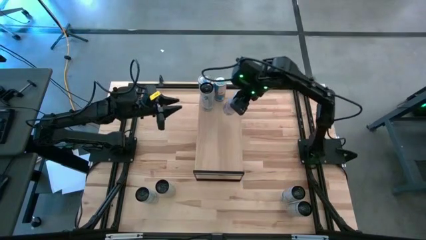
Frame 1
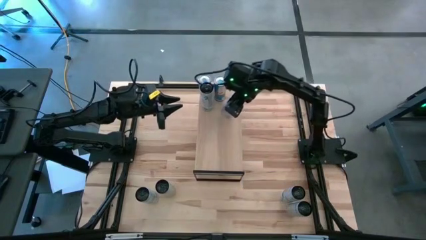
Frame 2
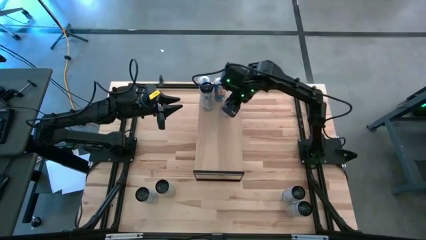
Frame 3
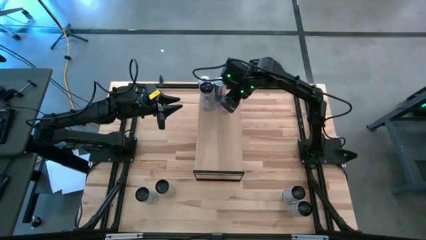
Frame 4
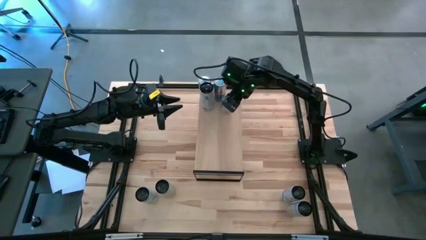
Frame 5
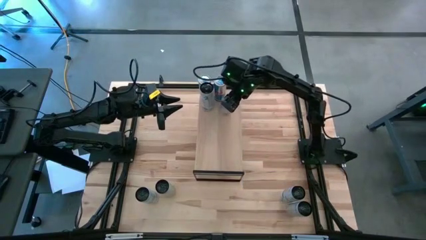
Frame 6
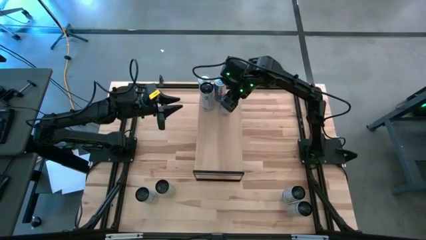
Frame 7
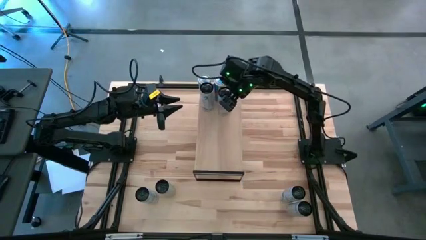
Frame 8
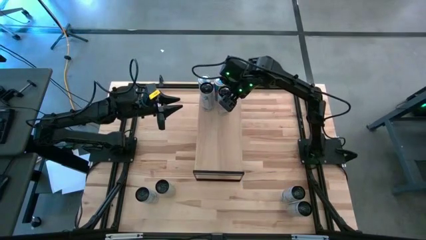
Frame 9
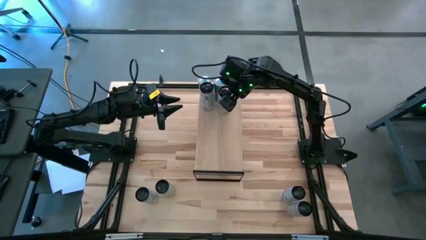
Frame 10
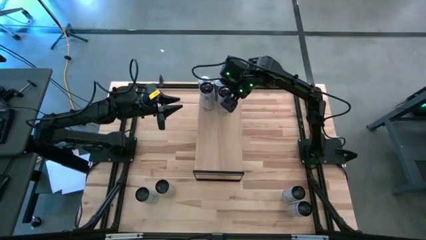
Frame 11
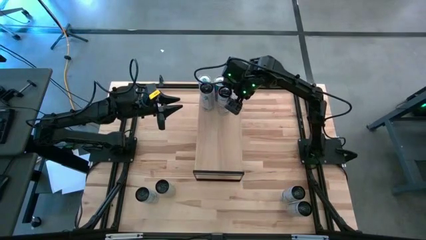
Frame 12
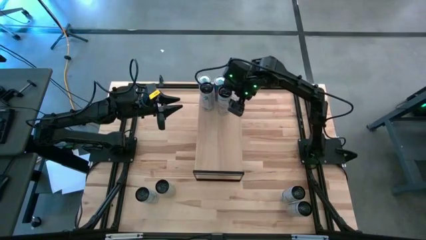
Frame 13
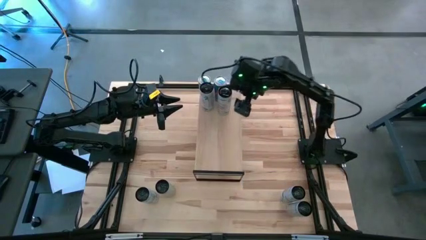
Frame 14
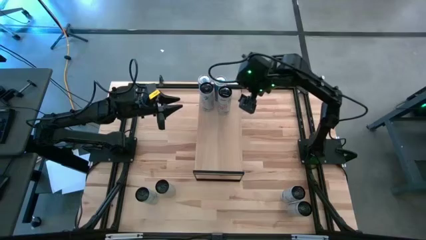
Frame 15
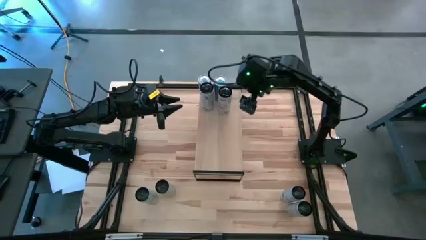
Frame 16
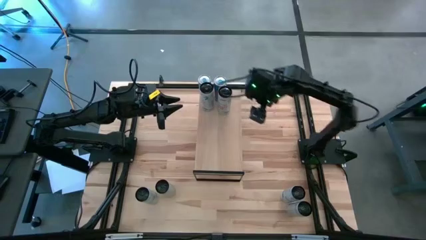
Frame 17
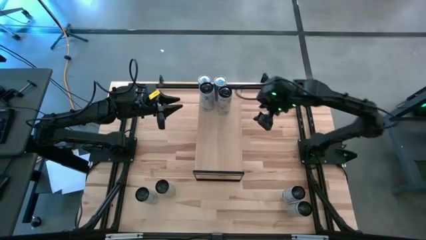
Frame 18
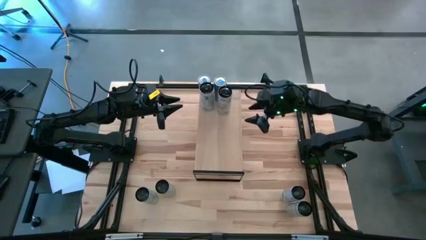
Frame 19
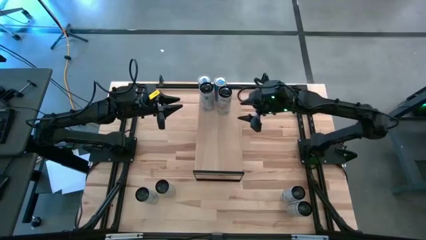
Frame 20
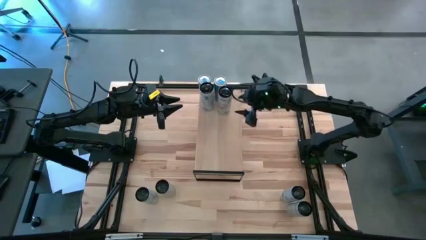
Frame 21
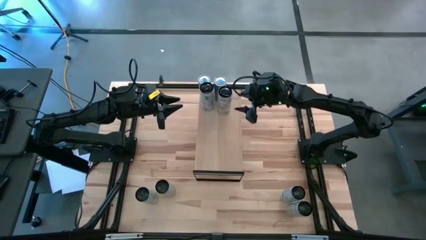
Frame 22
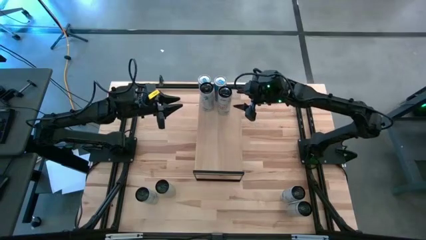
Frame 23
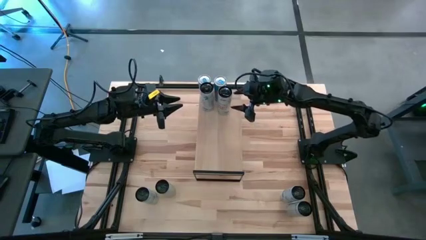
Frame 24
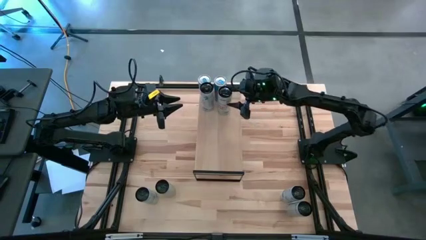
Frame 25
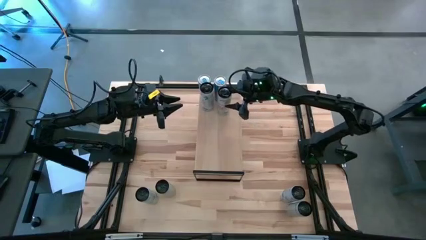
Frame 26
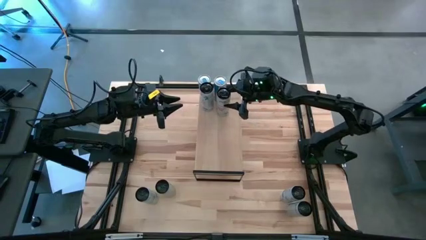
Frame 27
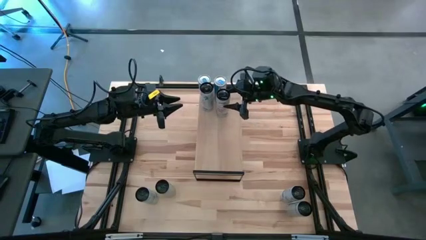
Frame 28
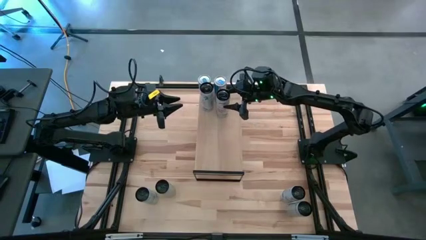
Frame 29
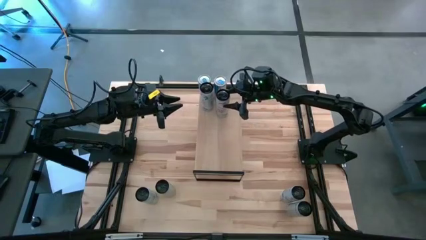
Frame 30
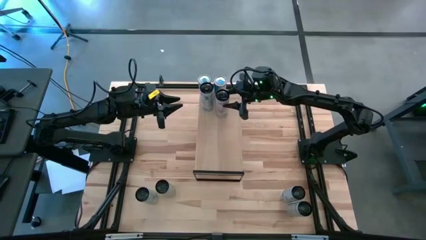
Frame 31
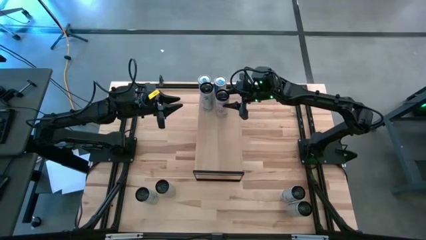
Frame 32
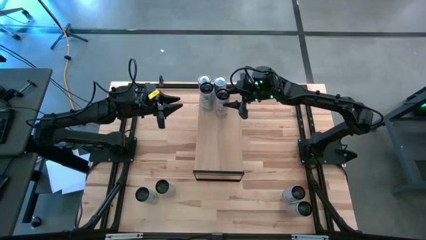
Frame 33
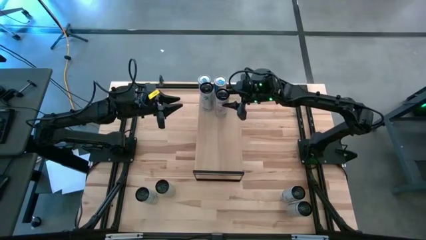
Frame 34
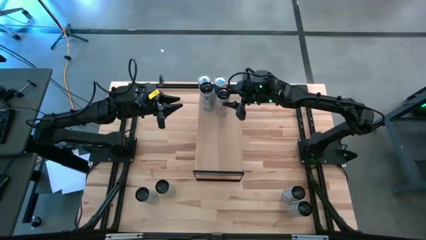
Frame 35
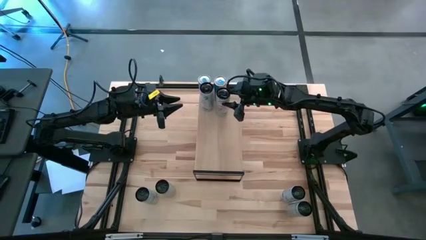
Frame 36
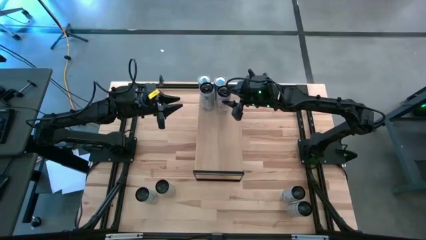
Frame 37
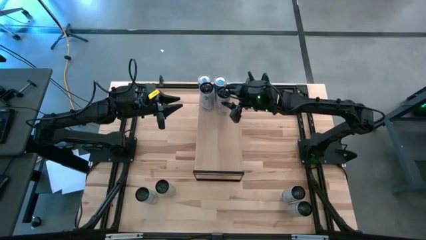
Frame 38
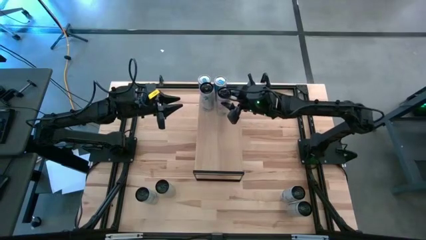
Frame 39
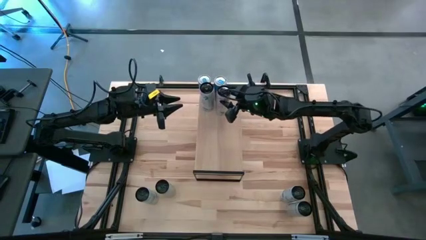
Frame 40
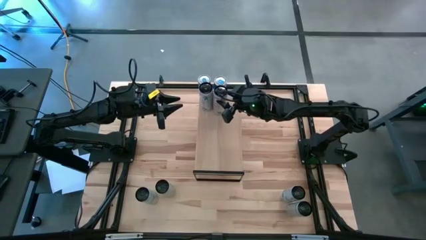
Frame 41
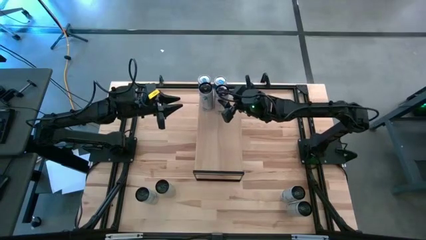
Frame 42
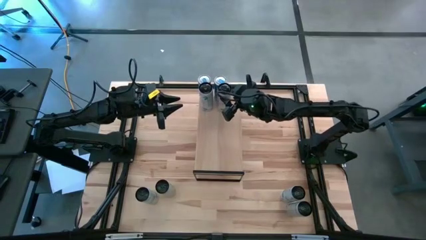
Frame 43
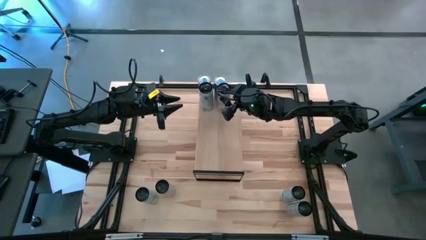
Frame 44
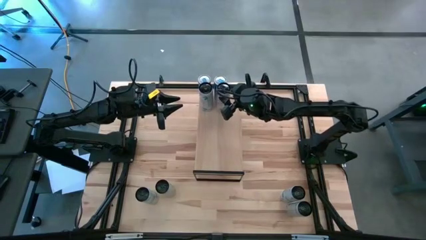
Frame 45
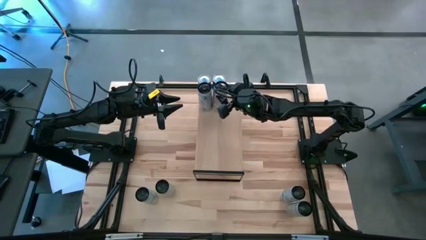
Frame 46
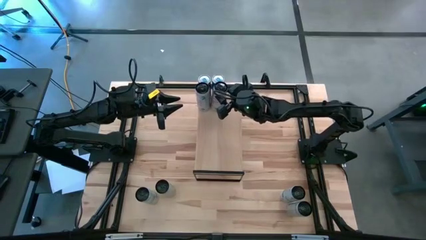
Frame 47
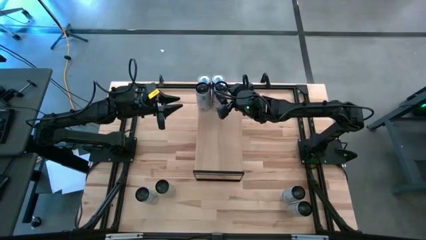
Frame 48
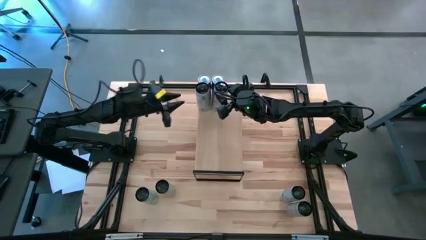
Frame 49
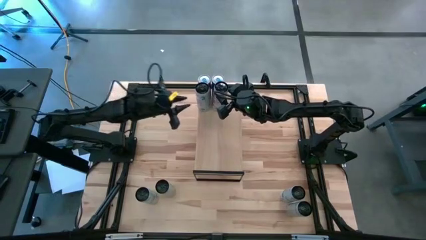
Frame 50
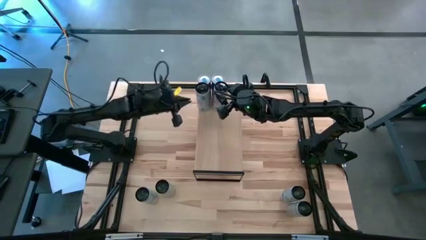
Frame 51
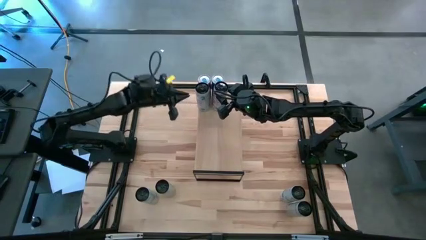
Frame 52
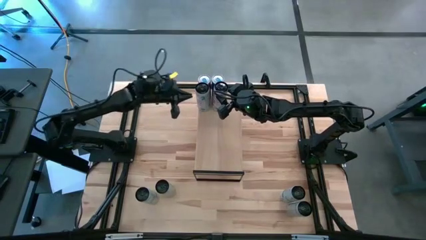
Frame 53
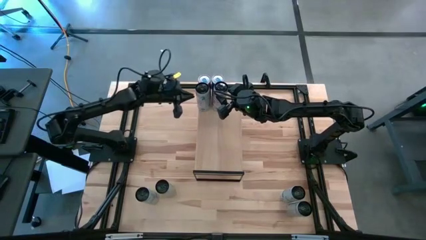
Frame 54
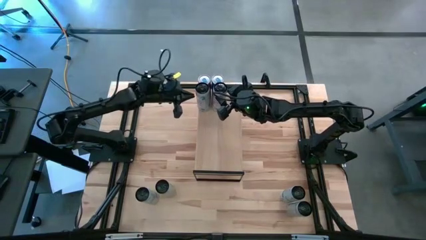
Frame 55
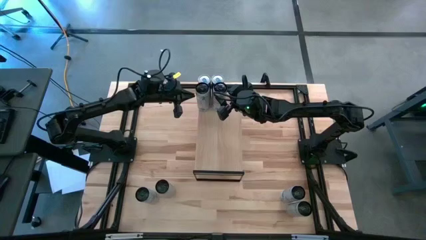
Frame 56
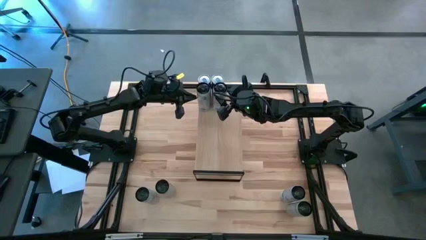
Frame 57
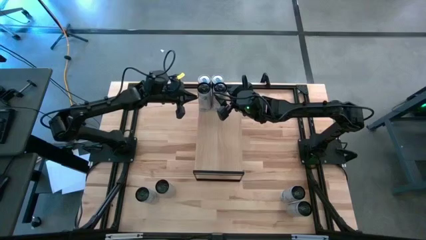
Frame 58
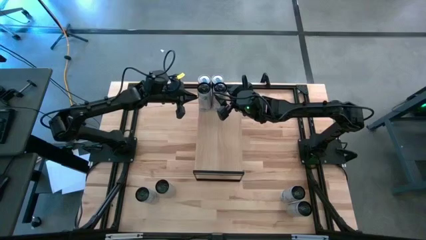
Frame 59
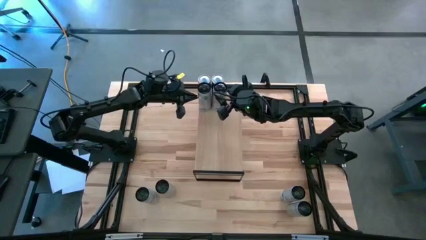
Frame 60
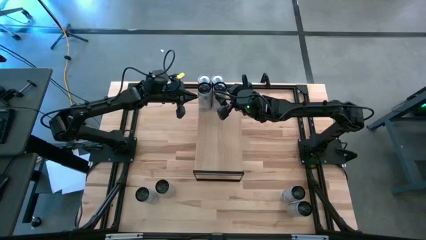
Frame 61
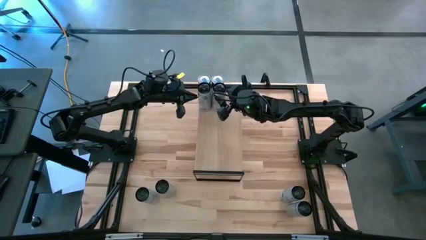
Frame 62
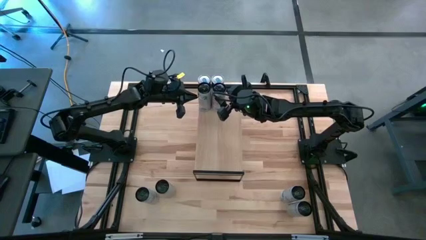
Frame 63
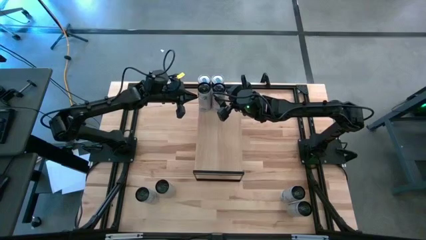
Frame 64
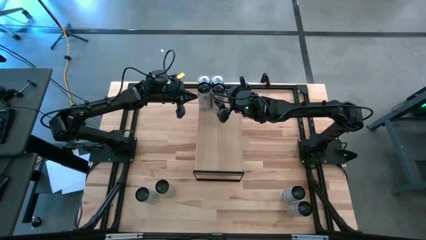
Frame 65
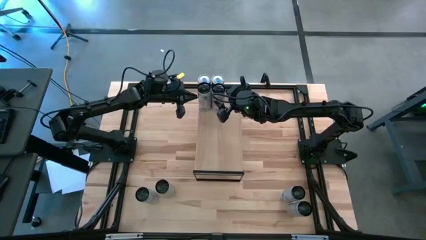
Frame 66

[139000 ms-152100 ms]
Task: Place canned beverage on shelf
Put the white pink soda can aligned with the other white pink soda can

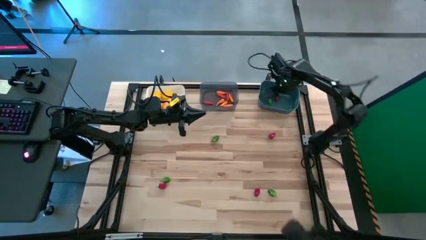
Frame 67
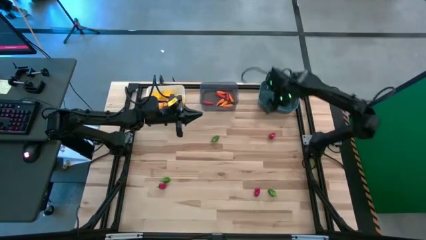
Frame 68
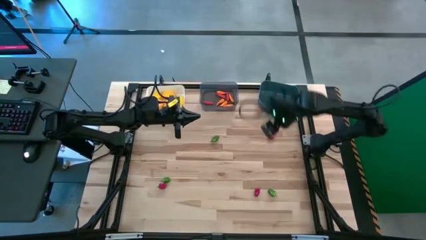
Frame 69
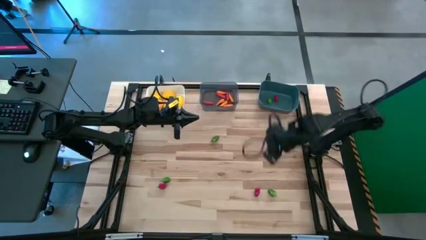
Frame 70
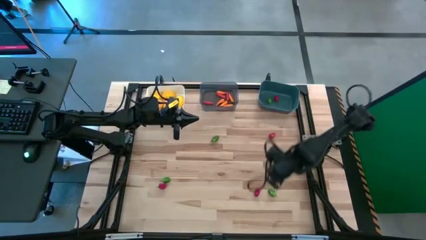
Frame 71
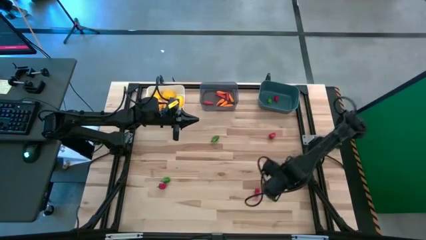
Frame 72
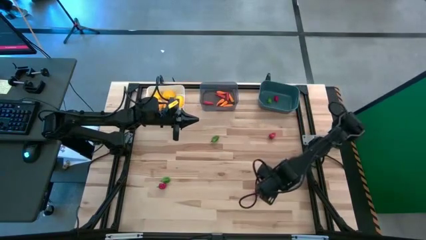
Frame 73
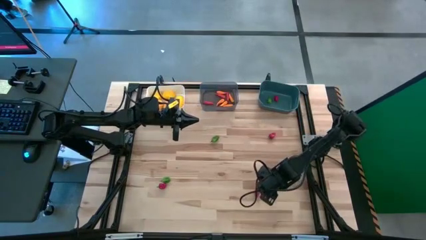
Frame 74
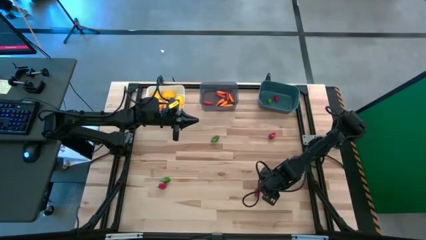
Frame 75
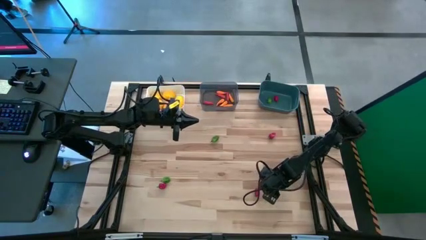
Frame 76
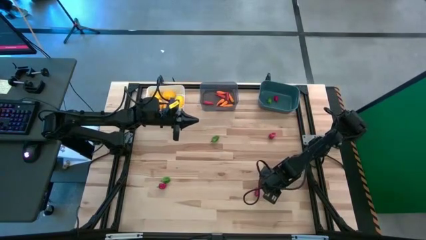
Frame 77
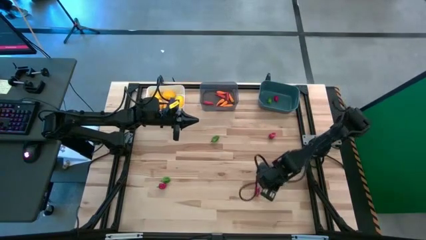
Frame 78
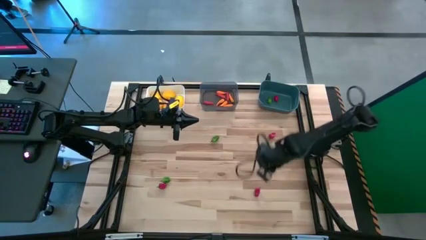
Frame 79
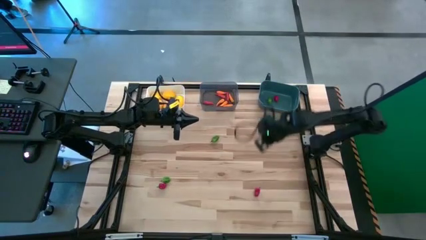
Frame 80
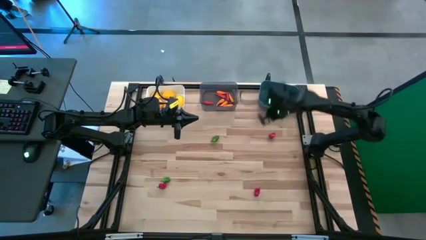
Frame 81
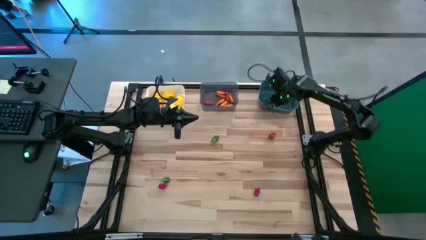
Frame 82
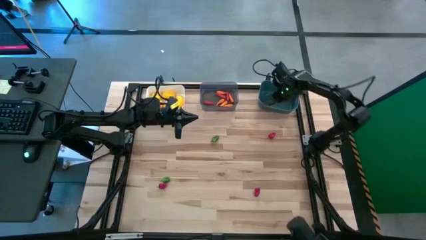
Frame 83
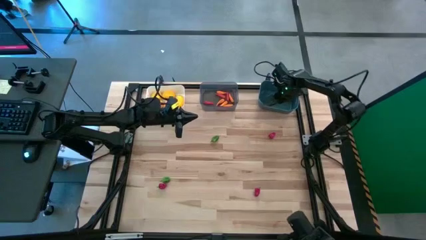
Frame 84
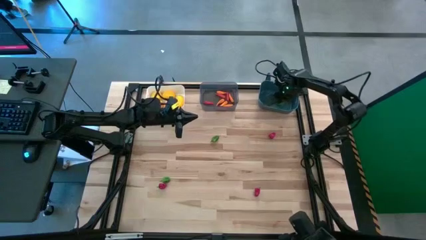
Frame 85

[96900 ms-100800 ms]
Task: Sort produce into baskets
Put the bottom right green bell pepper into the blue bin
